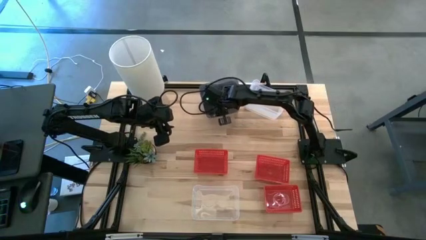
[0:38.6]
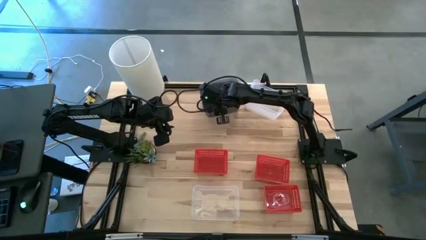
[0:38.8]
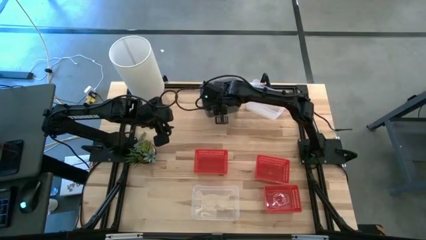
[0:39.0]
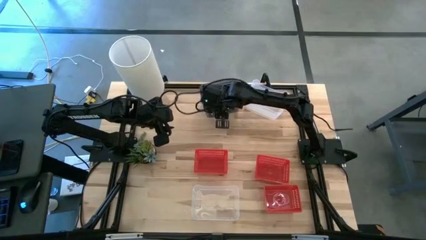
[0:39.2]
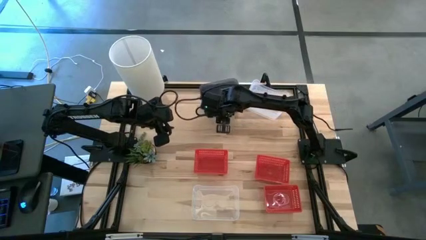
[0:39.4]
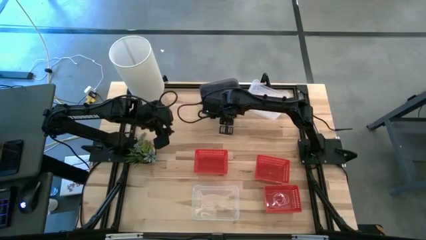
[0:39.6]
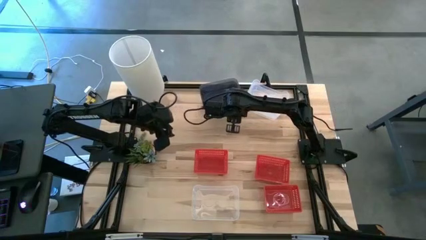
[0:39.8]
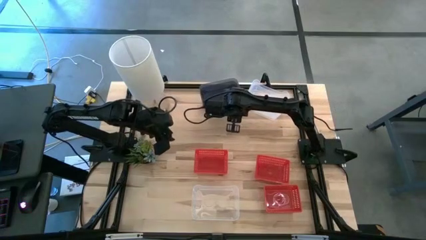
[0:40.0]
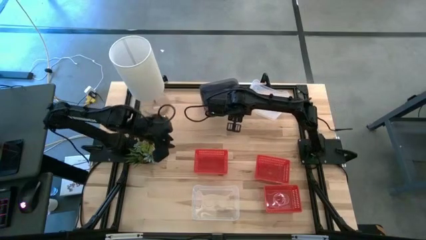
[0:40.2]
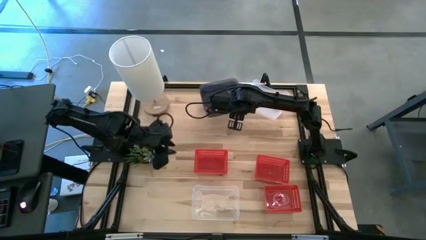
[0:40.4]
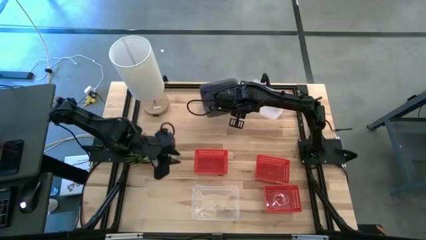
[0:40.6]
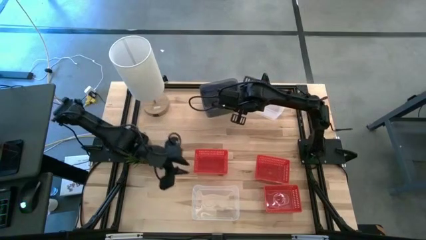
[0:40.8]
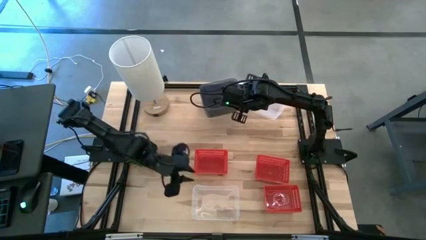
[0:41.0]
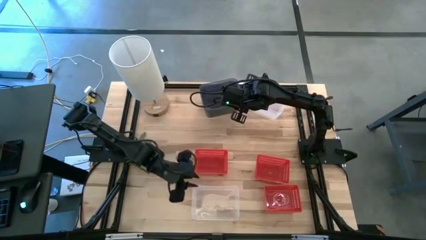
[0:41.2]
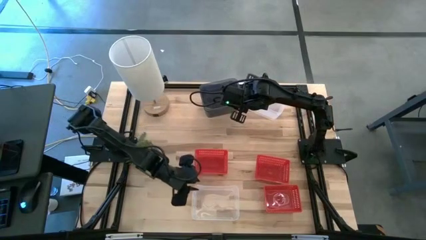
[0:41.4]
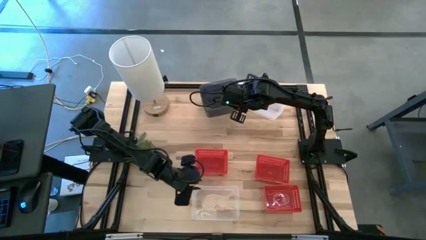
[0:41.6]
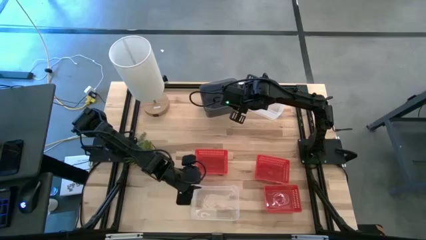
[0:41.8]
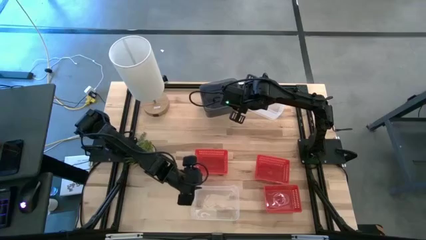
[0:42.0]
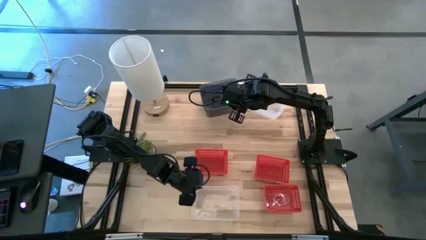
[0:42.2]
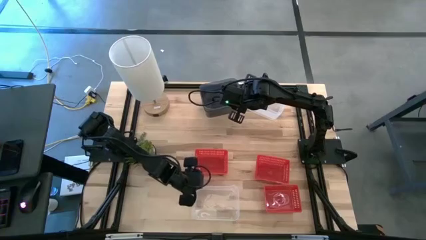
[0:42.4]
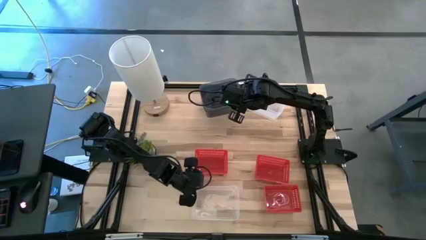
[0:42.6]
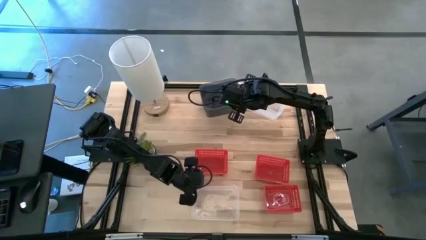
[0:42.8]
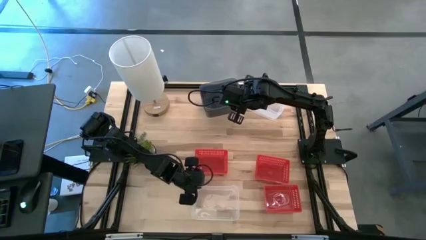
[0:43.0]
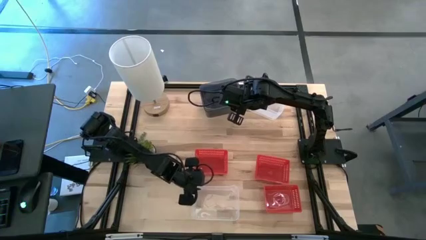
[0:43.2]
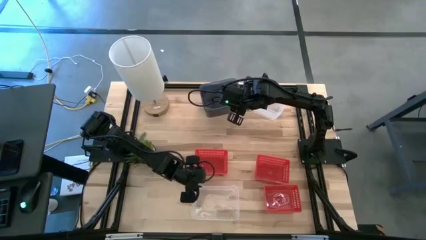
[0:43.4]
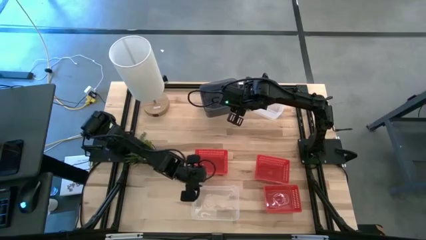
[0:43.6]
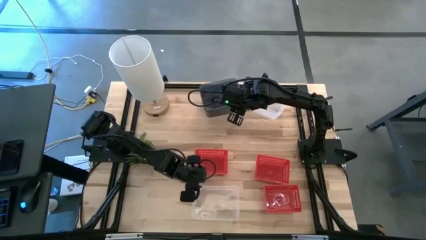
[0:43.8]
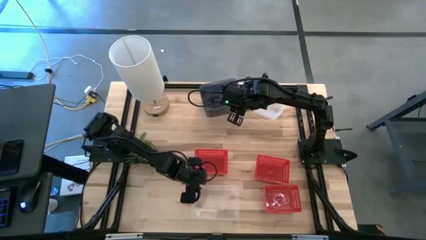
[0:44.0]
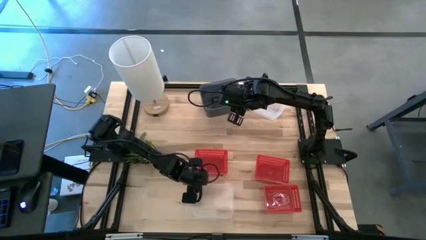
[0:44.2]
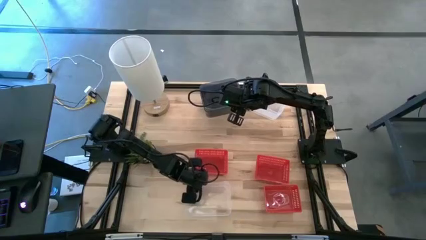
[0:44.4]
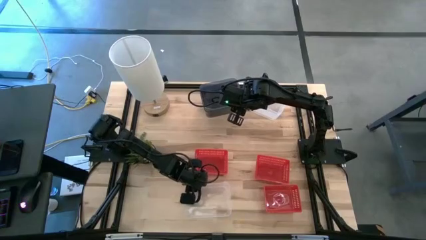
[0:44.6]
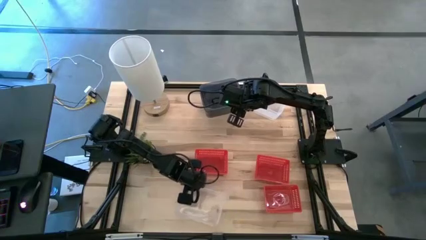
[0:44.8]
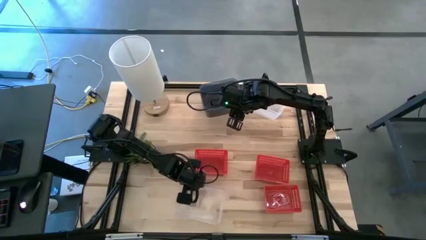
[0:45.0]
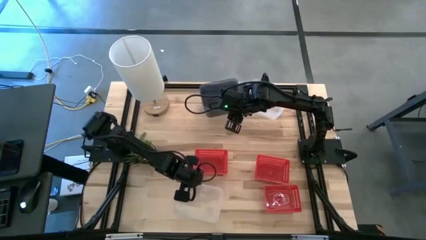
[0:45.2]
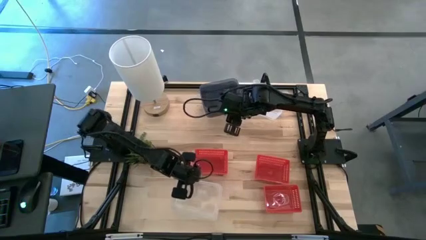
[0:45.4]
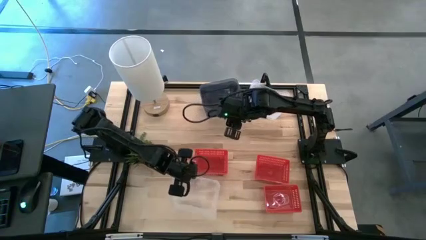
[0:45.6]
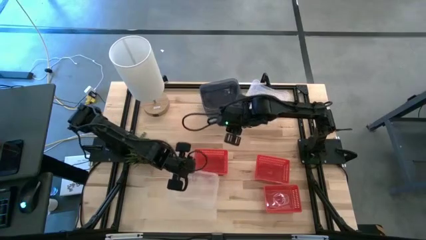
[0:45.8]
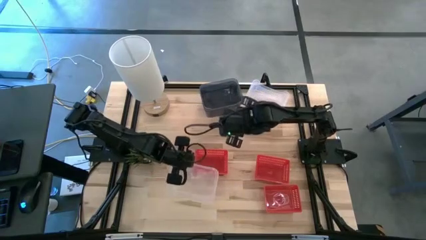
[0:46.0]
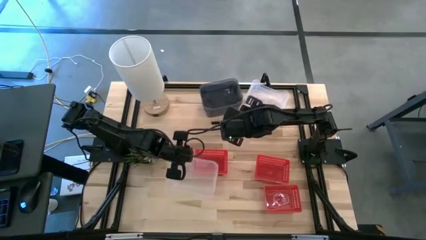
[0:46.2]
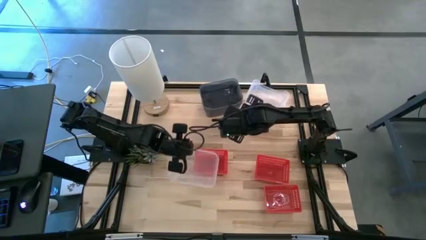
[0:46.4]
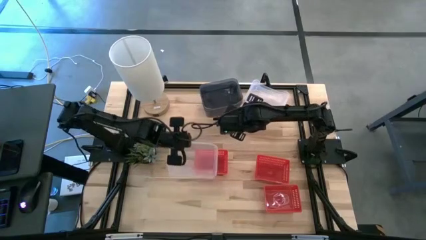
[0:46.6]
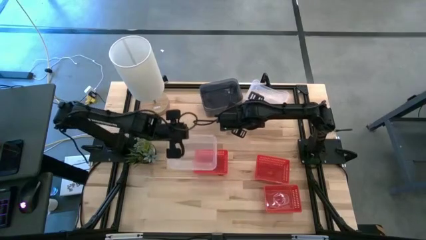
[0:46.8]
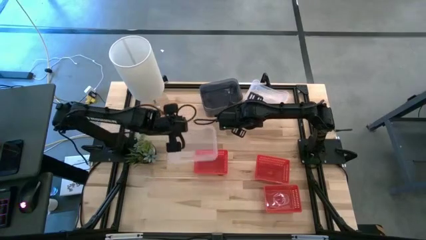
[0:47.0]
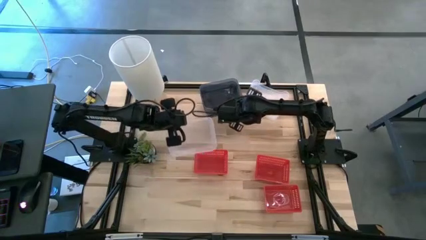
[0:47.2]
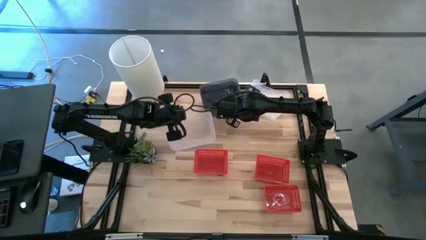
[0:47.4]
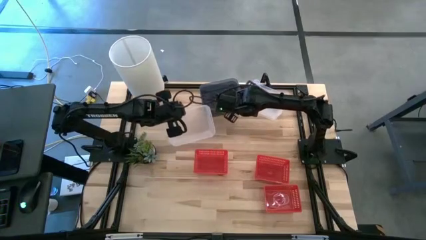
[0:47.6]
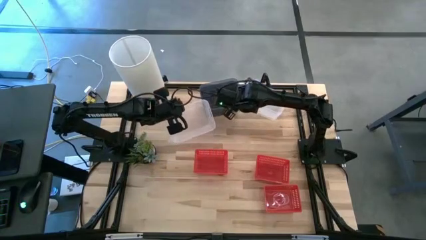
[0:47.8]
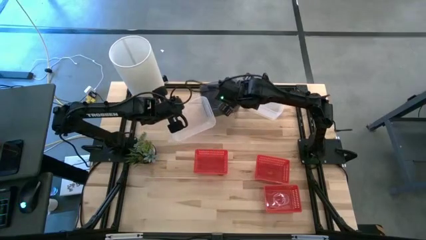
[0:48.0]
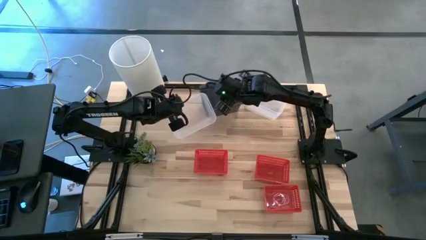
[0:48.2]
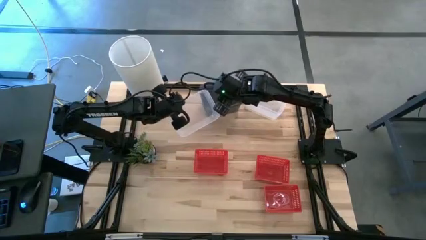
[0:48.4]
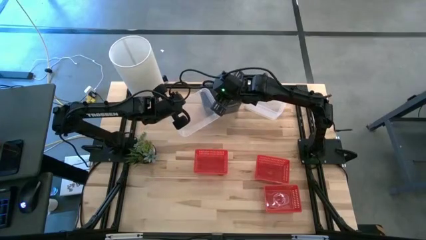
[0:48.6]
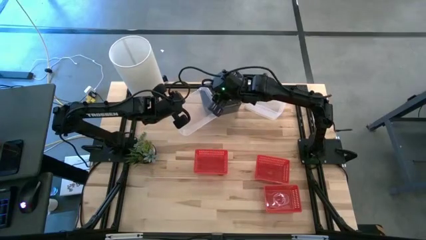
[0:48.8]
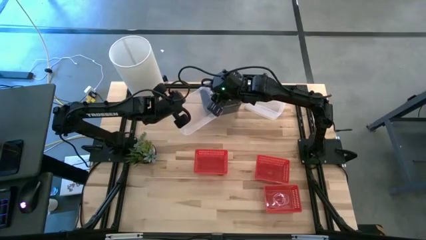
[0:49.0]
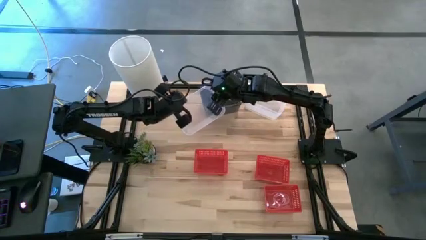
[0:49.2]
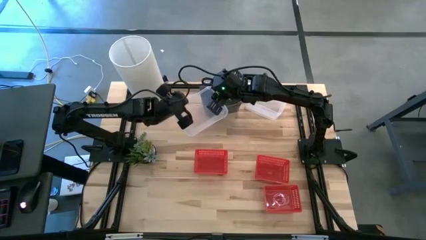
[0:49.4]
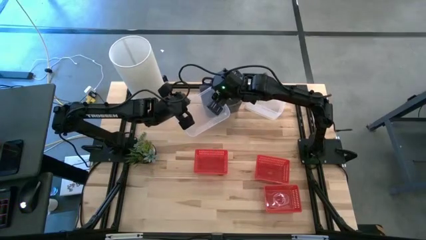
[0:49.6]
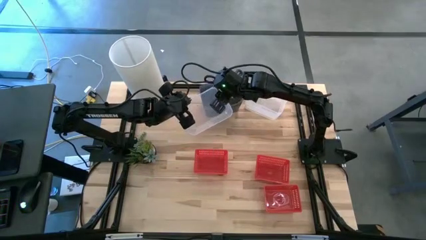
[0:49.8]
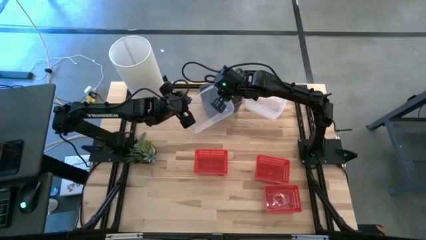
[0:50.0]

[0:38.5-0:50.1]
Stack the bottom transparent bin on the stacked transparent bins
